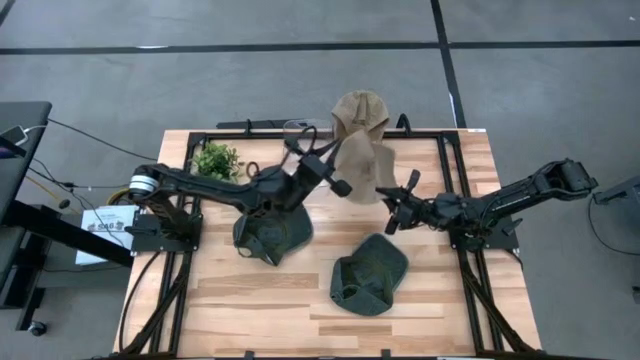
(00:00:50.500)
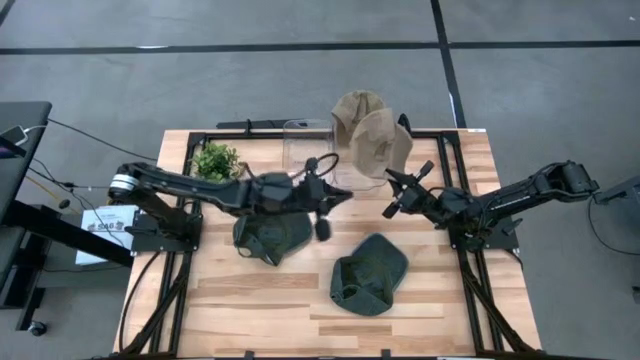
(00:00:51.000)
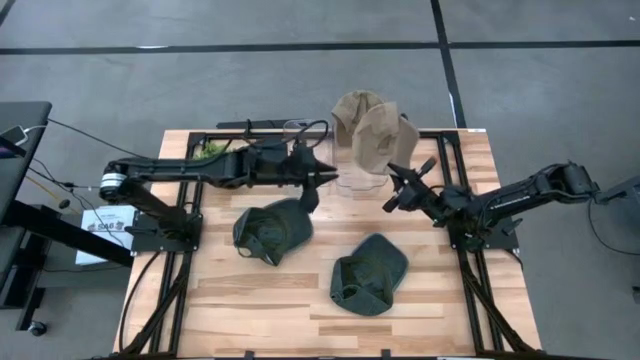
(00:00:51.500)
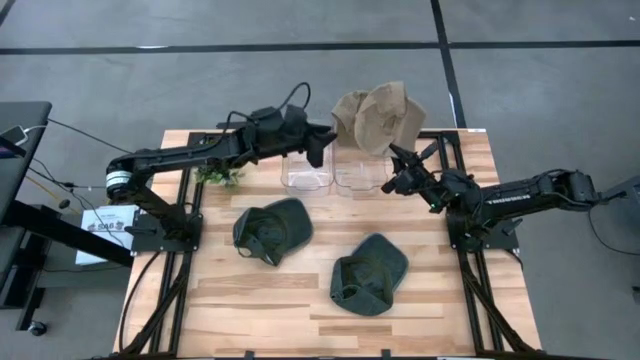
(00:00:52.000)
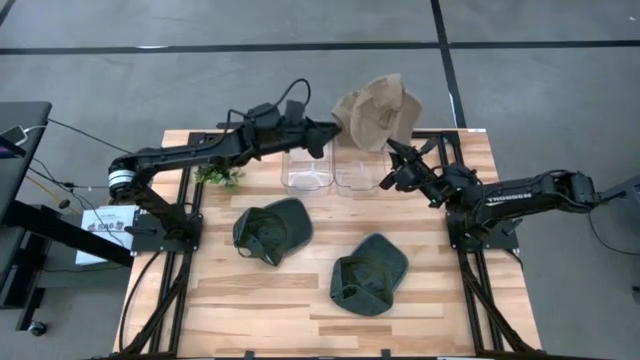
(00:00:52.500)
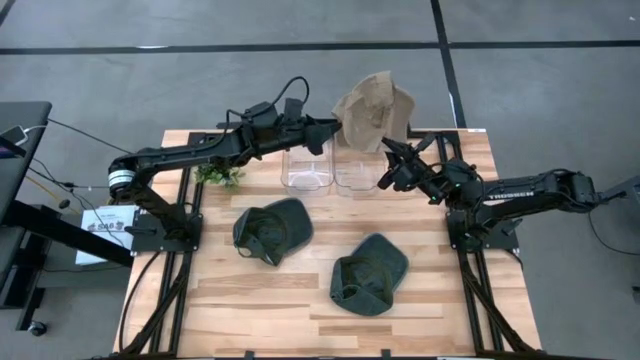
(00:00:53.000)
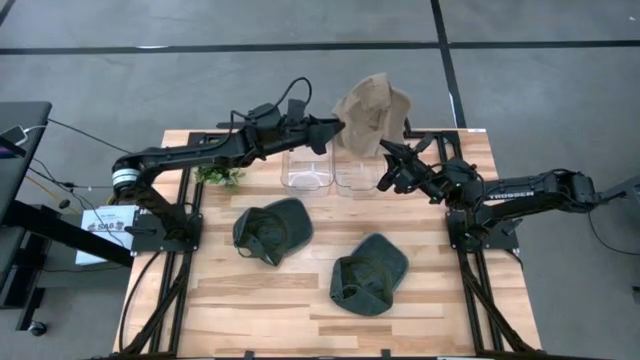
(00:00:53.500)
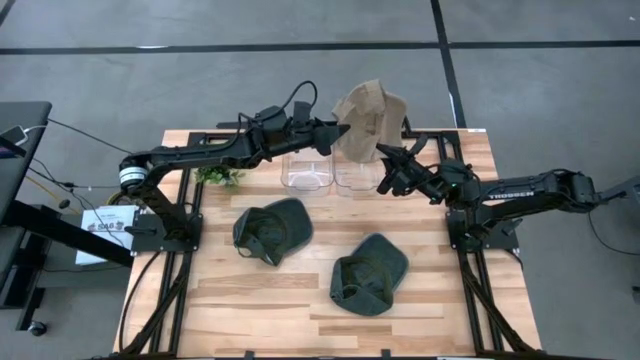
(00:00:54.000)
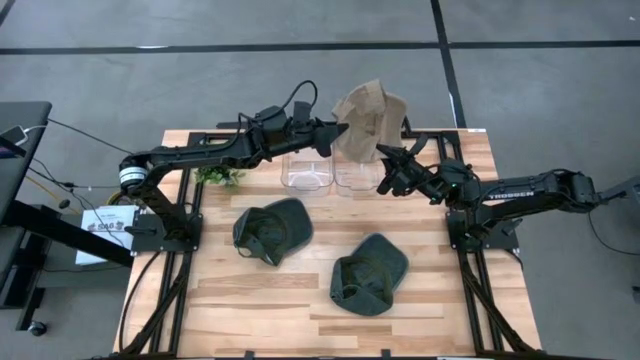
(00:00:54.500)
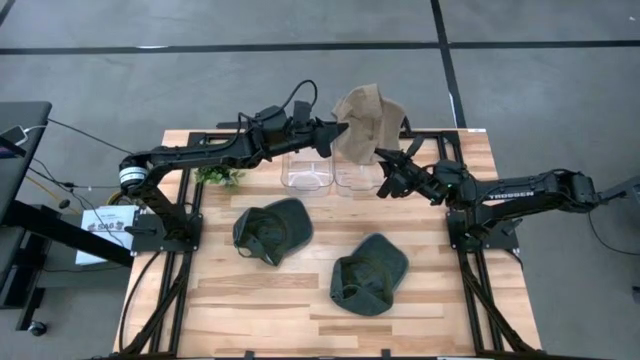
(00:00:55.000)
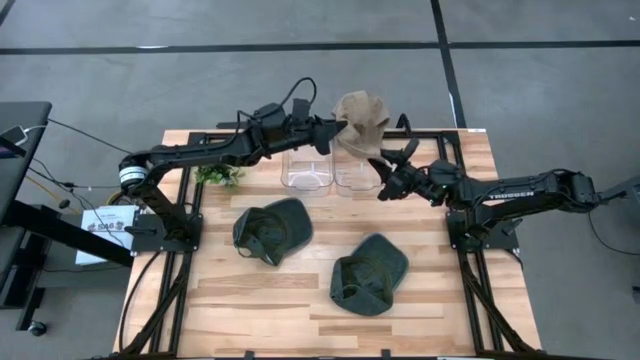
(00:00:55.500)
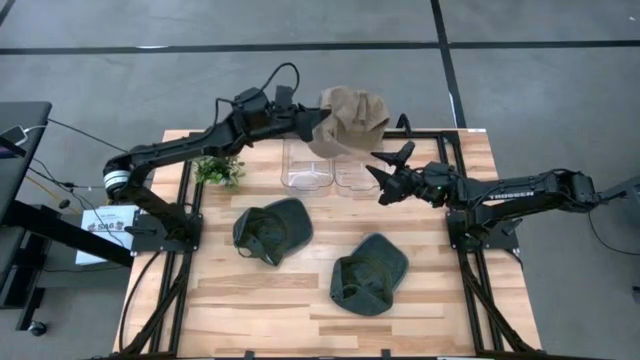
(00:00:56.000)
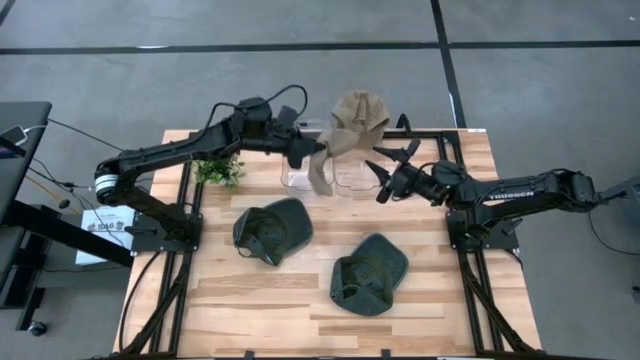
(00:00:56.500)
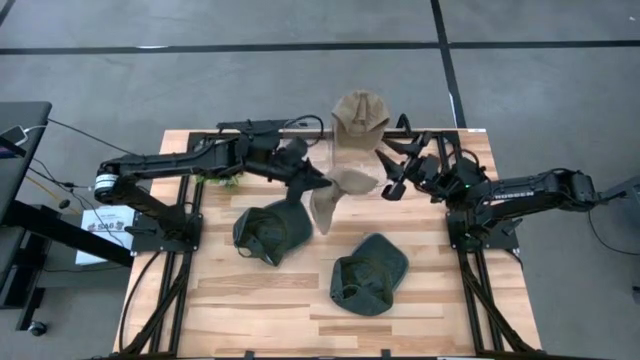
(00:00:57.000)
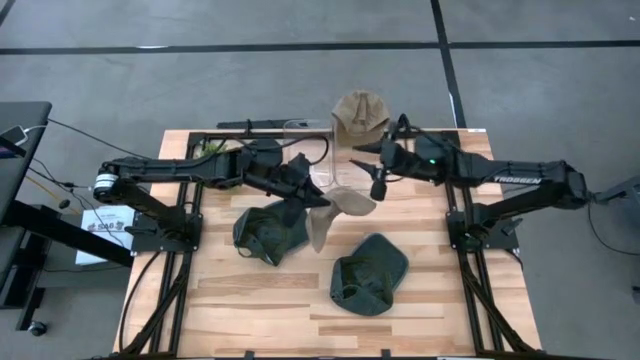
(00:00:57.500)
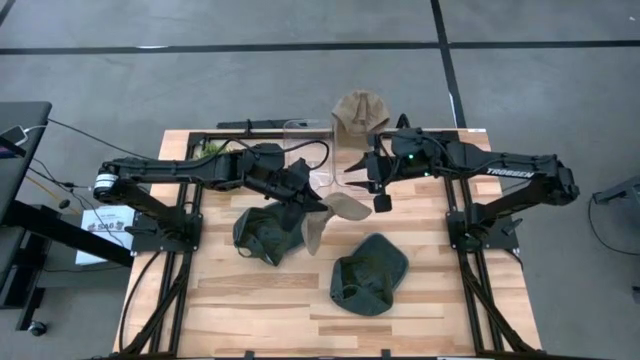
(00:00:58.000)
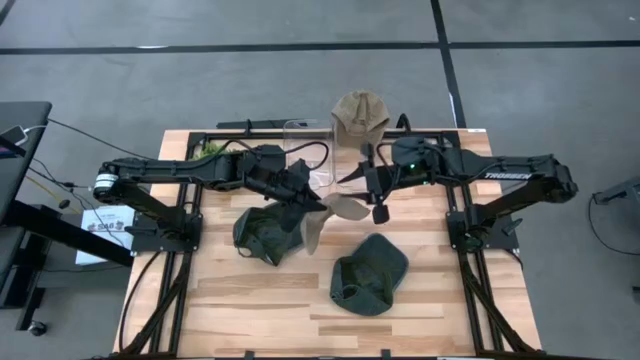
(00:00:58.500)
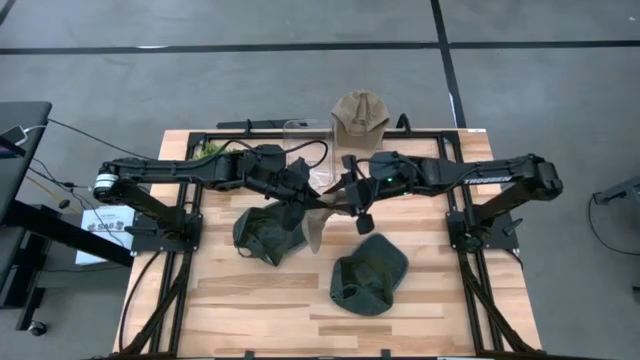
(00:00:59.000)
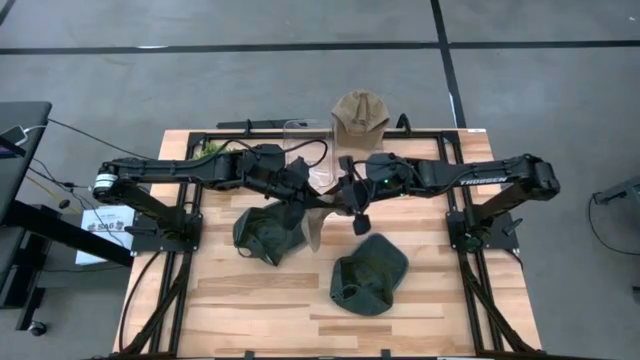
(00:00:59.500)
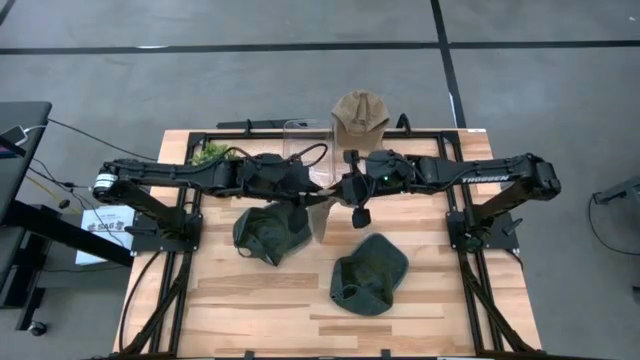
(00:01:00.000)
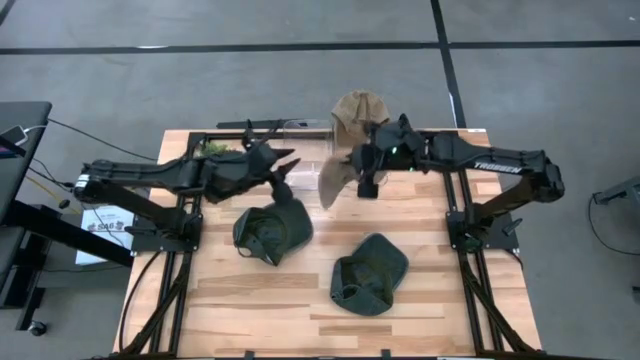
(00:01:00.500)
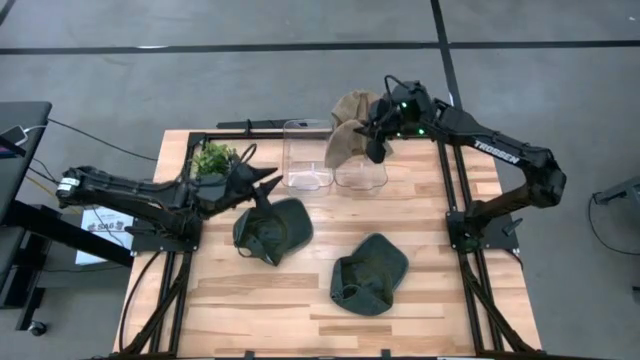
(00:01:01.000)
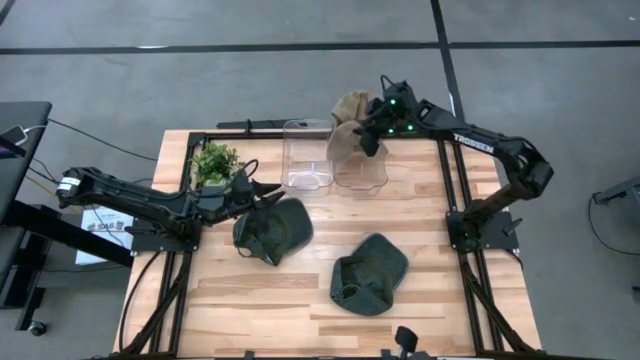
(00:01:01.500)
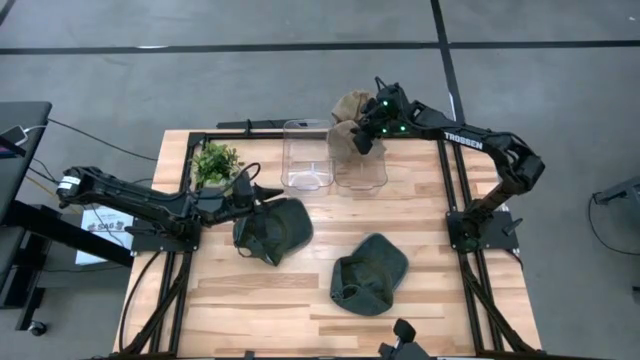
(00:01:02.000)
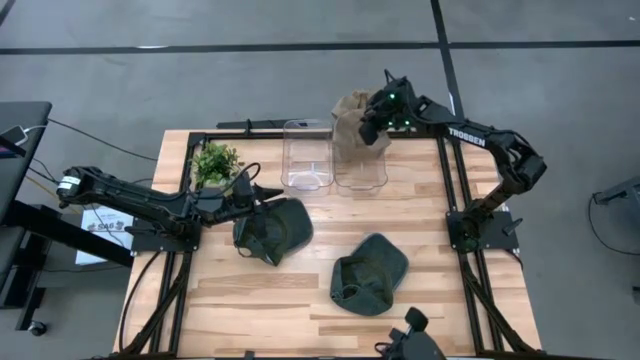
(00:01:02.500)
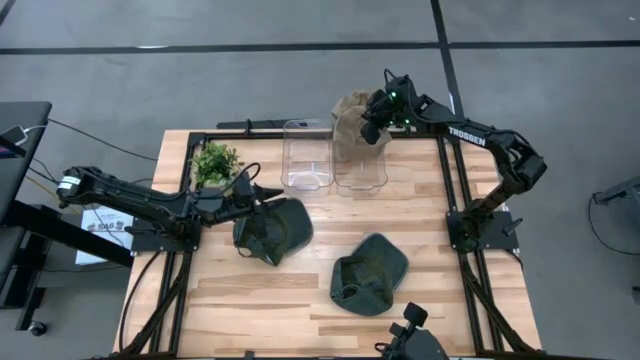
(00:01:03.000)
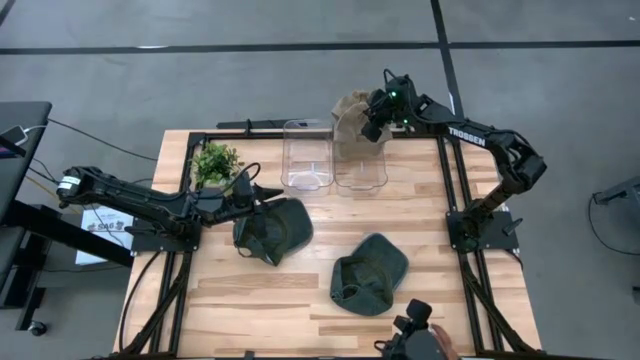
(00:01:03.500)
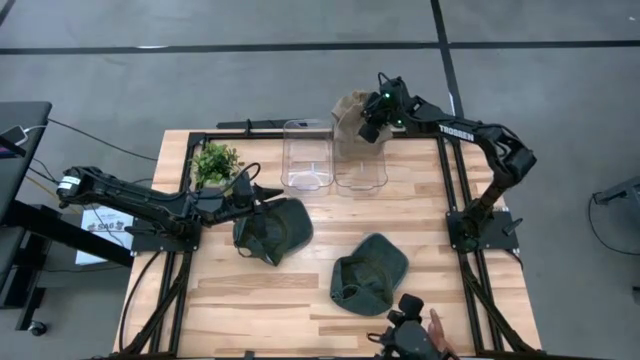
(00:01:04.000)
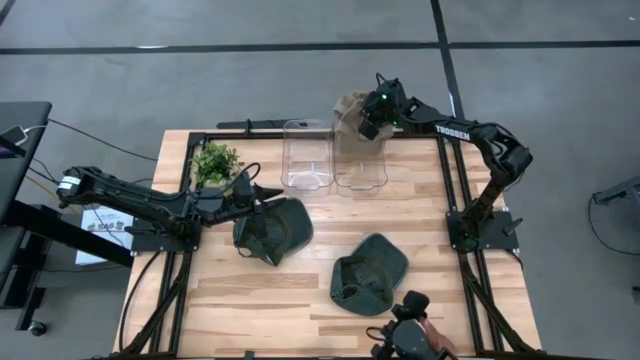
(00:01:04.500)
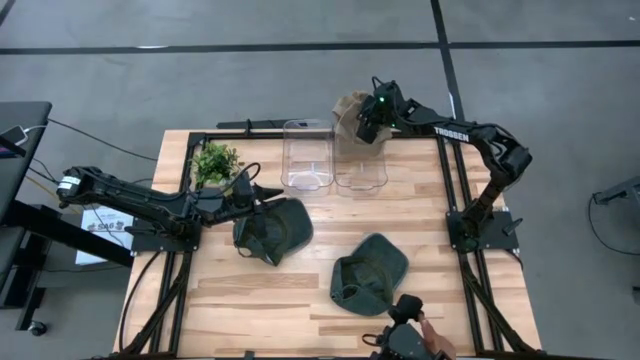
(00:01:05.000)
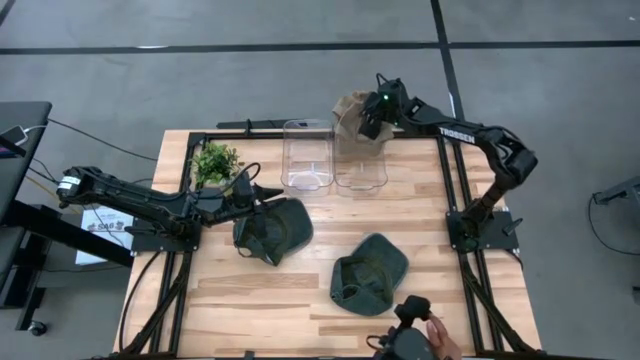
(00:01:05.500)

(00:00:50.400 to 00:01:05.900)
Task: Pick & Place hat
Put the brown cap into the right transparent bin

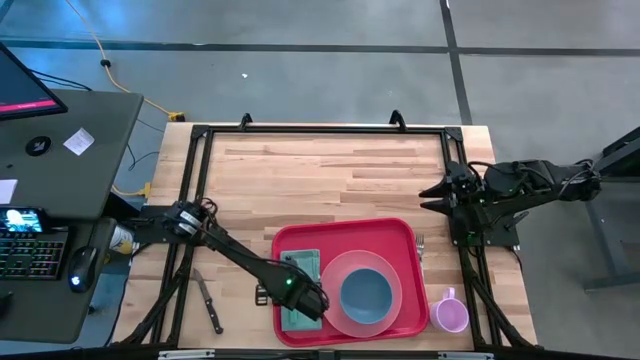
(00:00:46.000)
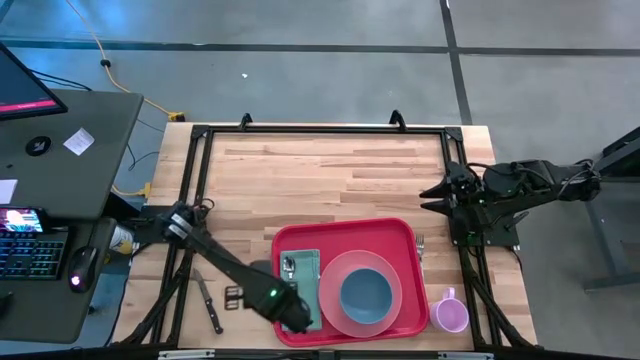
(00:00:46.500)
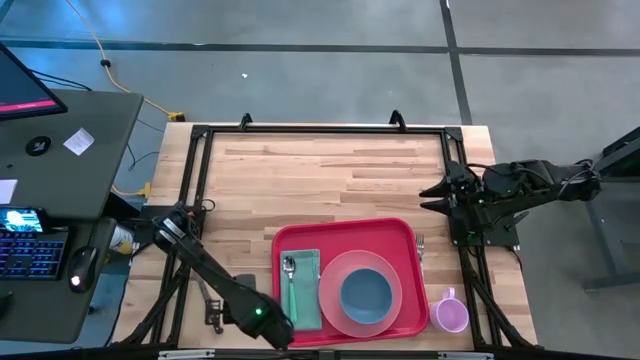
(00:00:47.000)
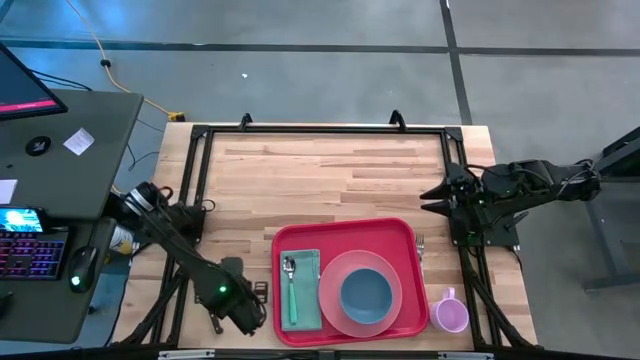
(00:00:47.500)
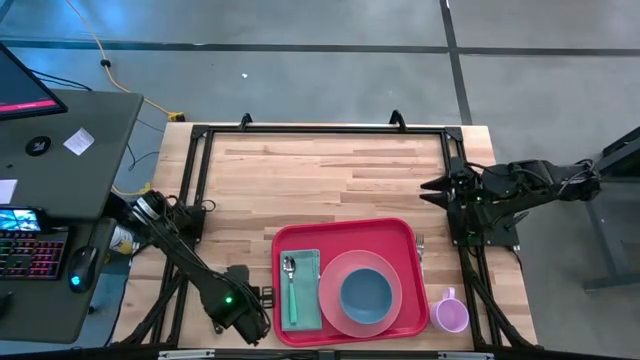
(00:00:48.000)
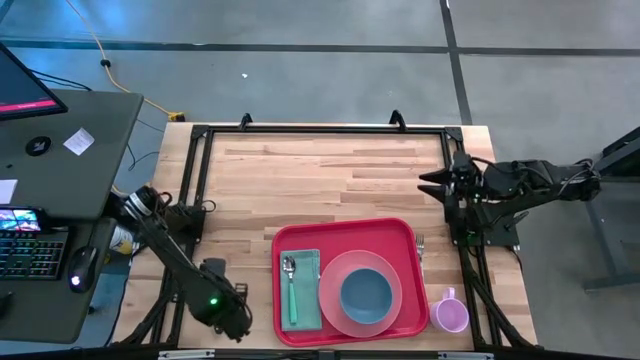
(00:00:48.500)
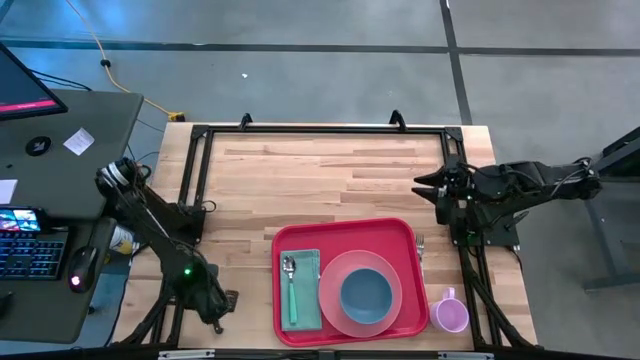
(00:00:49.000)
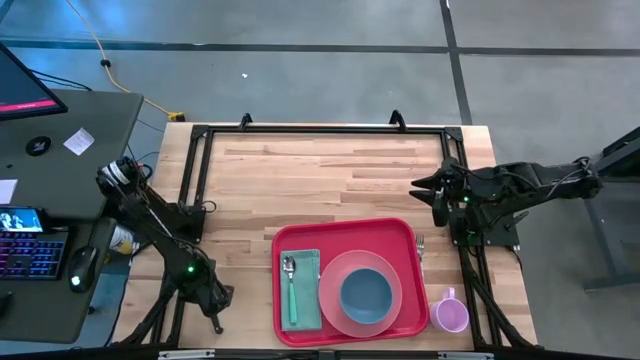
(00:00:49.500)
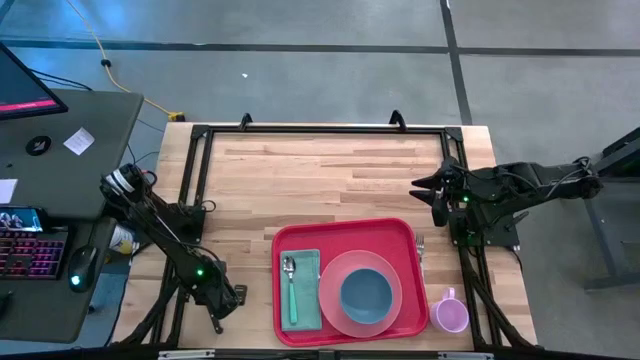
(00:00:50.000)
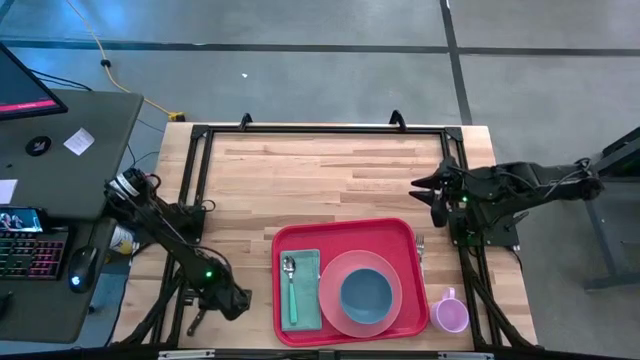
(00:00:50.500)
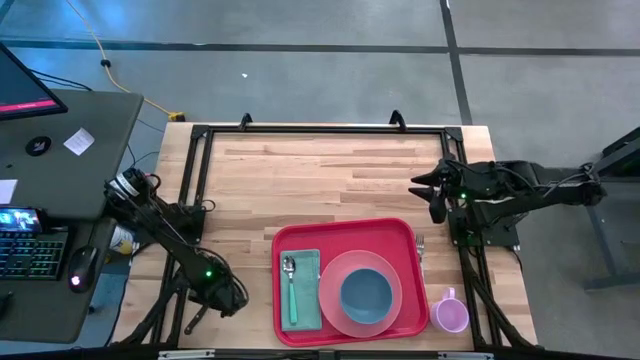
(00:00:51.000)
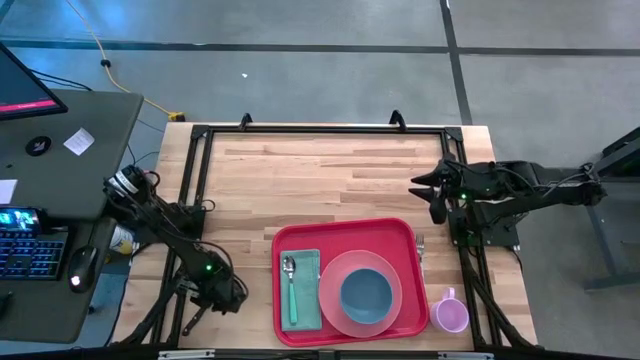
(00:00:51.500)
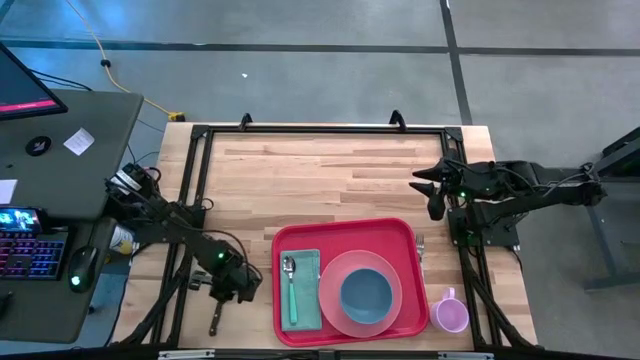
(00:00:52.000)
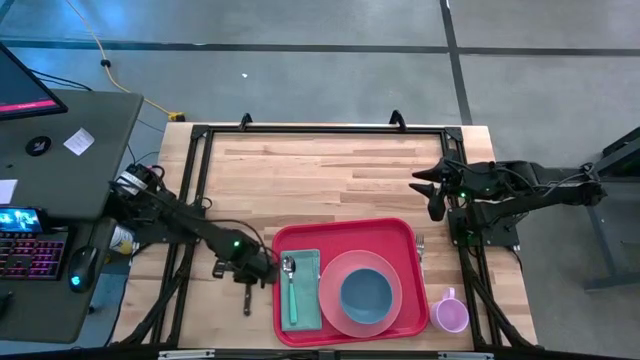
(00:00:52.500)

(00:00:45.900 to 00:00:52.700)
Task: Set up tray
Put the black knife on the blue napkin to the right of the blue spoon
